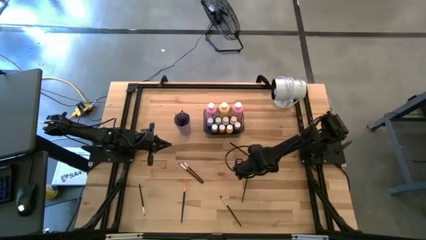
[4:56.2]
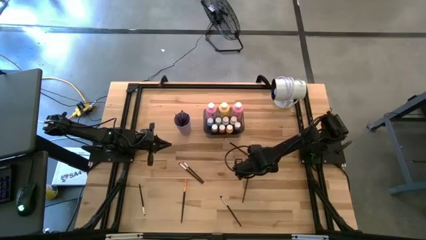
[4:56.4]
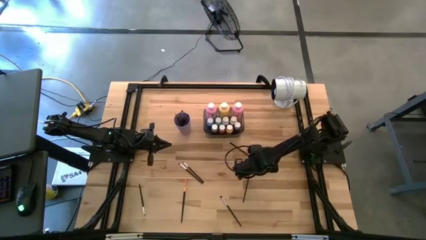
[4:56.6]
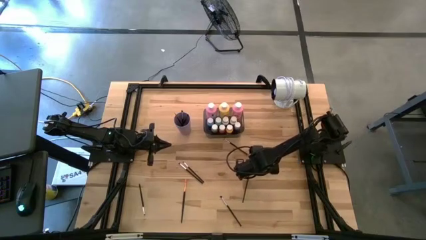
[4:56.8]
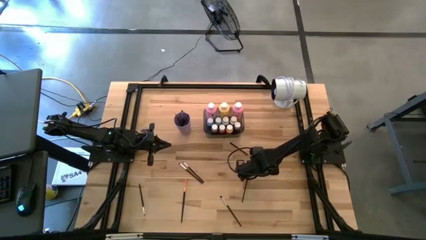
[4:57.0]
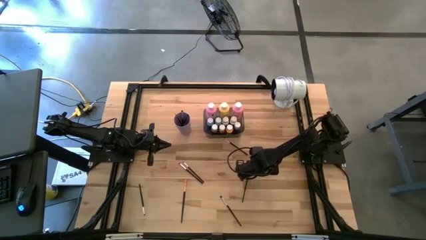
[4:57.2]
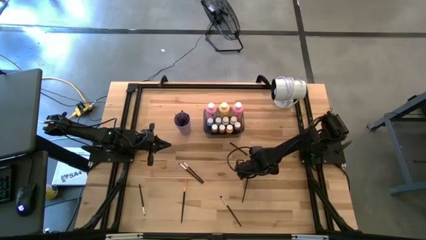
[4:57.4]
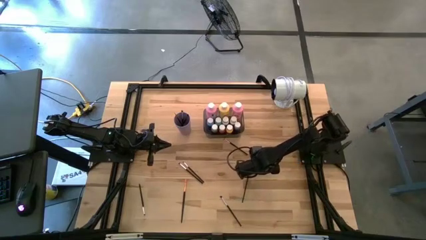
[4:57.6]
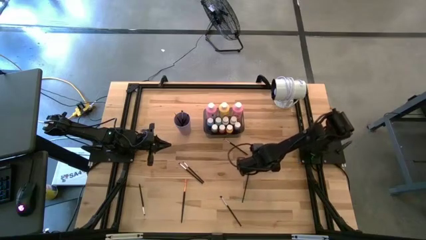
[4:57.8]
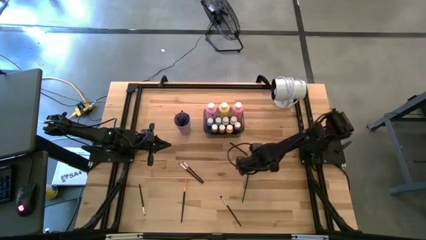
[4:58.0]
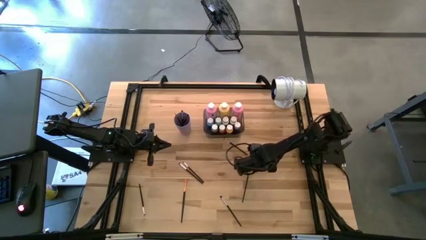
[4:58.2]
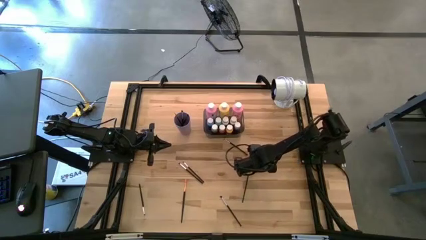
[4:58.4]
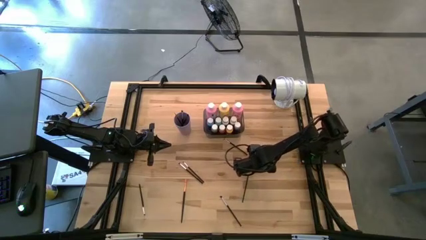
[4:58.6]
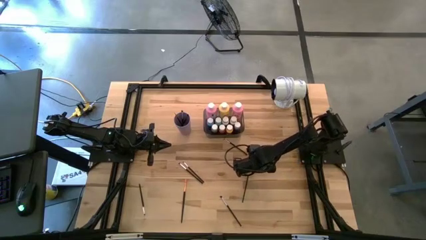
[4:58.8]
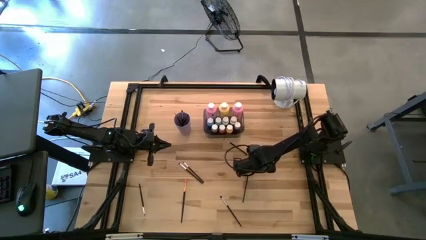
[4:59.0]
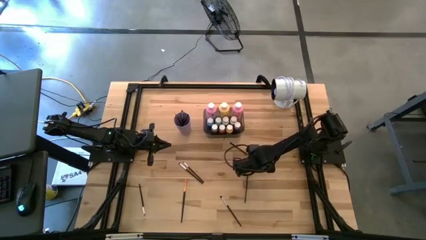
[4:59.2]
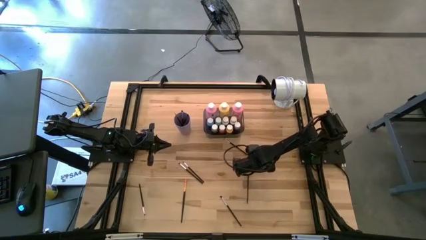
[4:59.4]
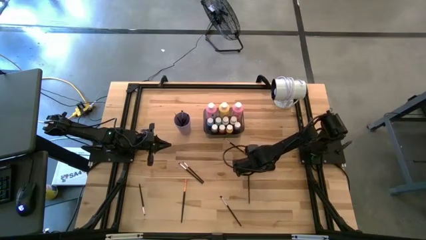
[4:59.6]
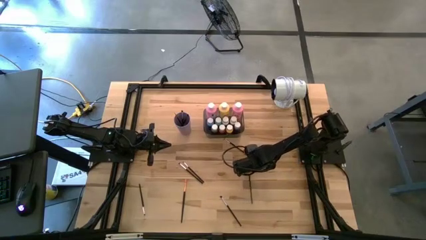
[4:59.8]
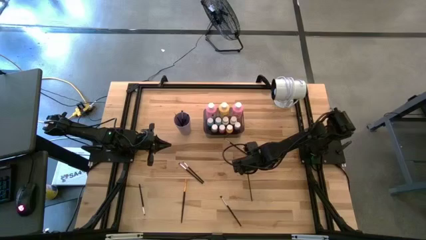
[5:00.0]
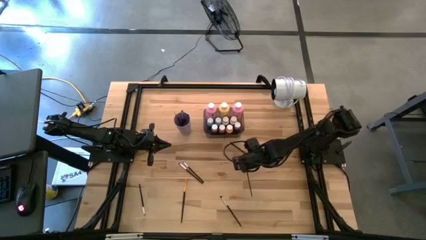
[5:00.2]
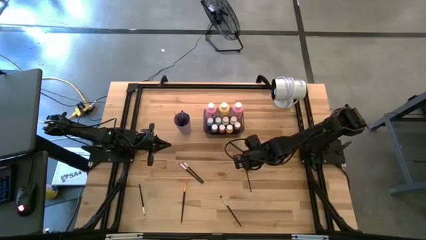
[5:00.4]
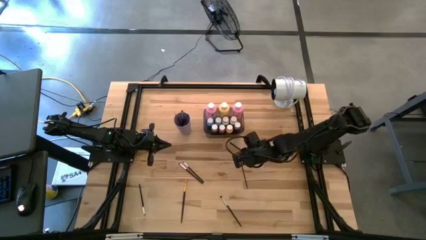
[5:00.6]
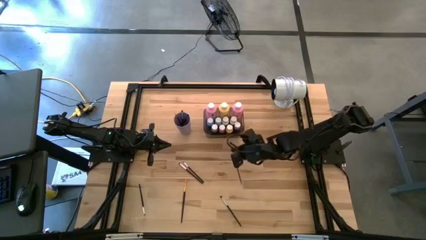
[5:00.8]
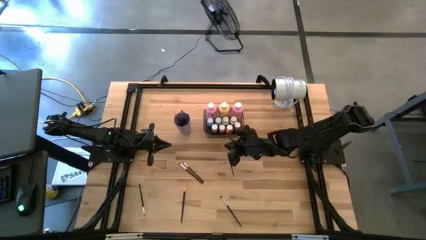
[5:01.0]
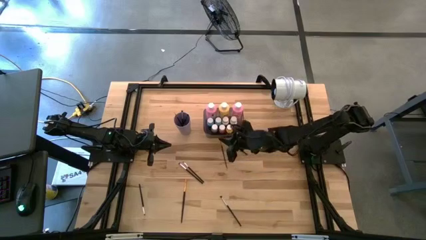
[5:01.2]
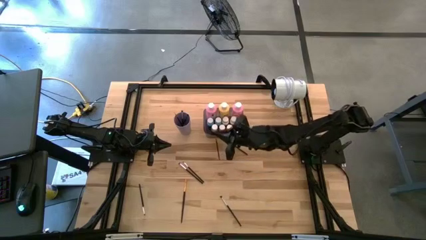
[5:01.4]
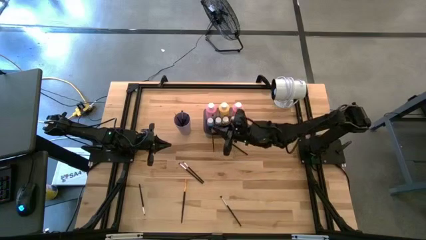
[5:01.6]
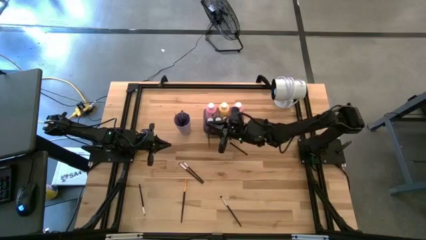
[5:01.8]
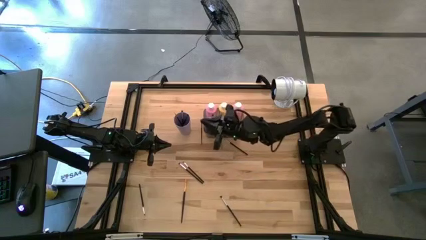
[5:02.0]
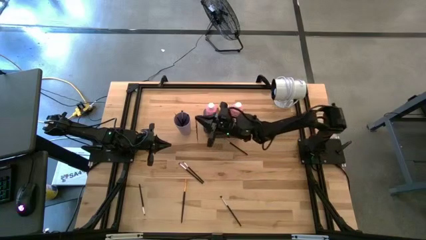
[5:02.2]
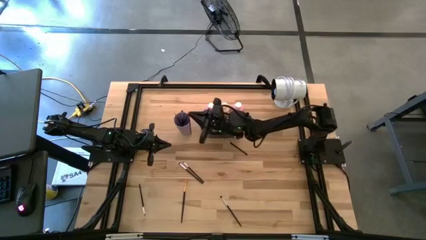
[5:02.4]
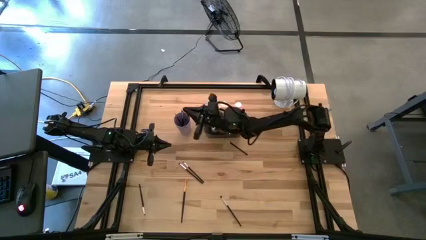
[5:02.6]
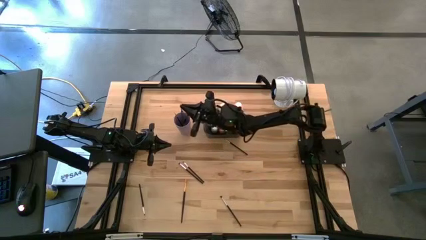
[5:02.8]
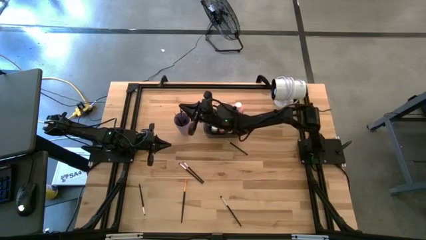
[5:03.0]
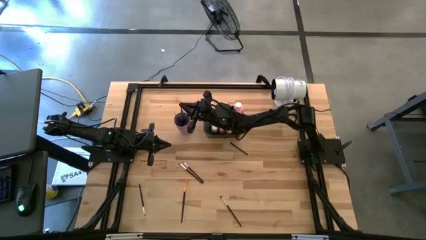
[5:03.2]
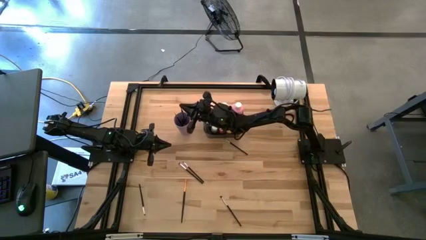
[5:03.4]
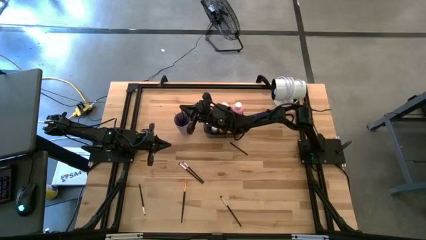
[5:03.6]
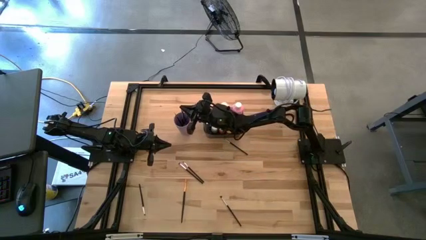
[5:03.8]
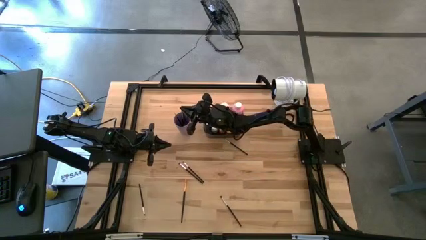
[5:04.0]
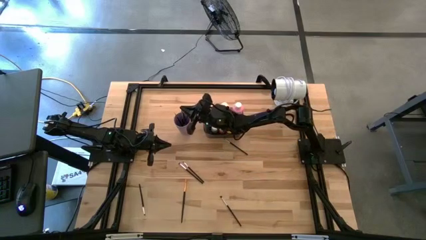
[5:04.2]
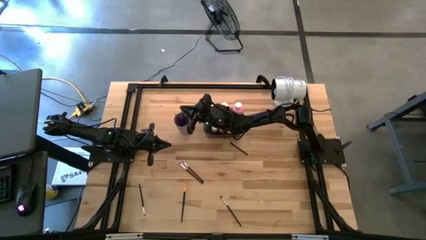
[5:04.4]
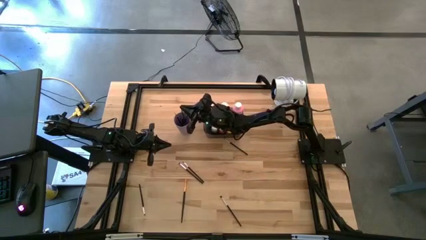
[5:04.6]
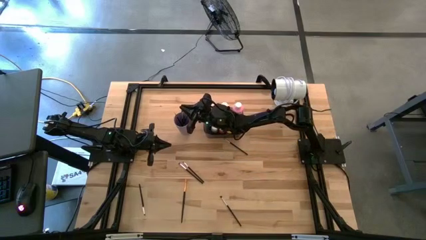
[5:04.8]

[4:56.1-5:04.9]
Task: Pick & Place Paint Supplies
Put the gold paint brush into the purple cup

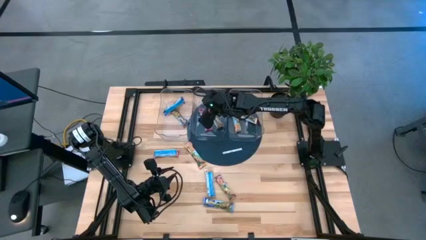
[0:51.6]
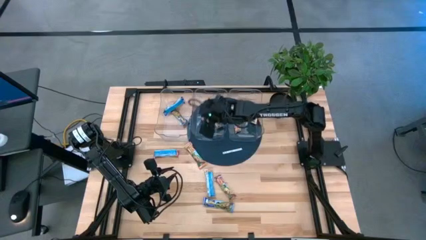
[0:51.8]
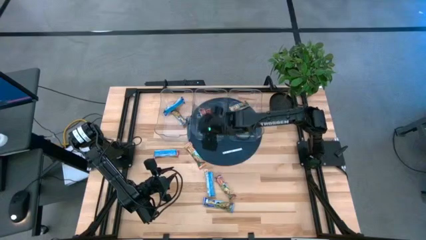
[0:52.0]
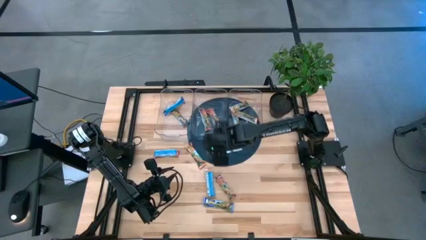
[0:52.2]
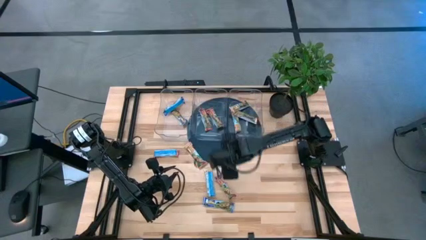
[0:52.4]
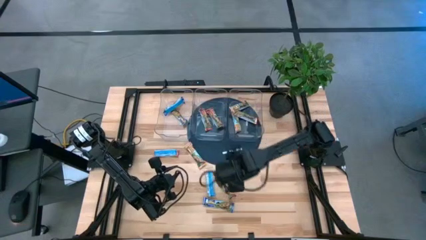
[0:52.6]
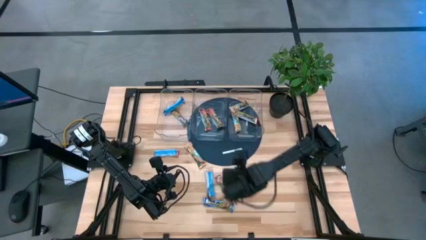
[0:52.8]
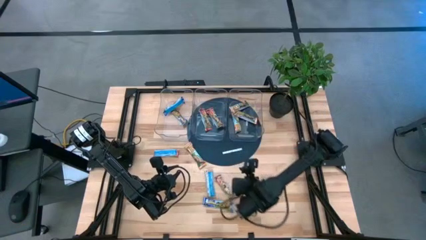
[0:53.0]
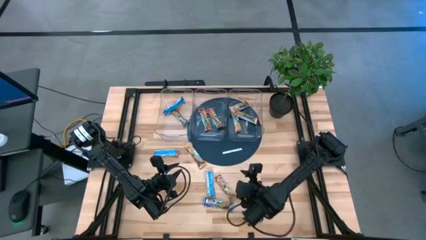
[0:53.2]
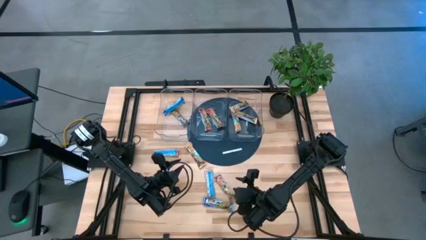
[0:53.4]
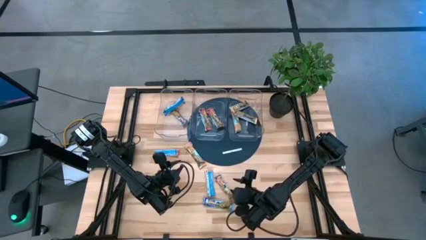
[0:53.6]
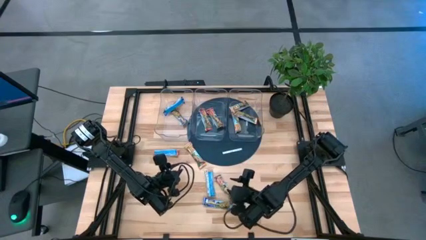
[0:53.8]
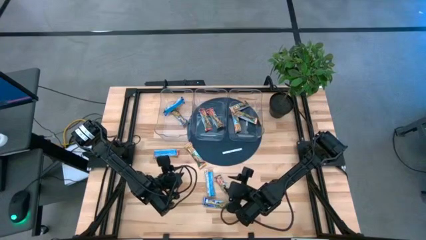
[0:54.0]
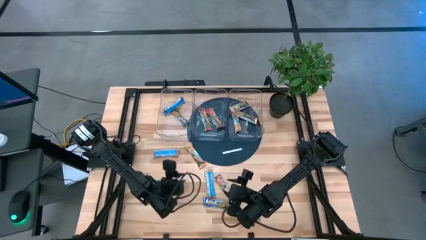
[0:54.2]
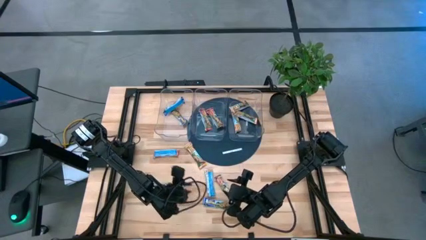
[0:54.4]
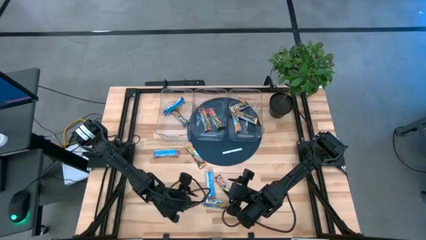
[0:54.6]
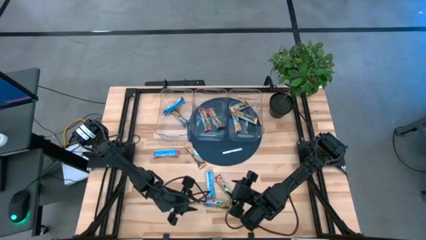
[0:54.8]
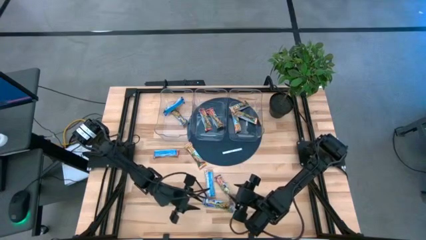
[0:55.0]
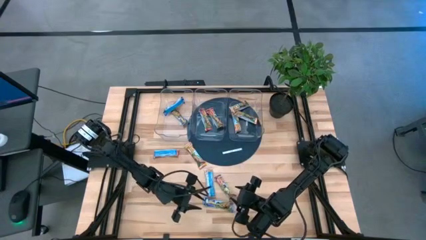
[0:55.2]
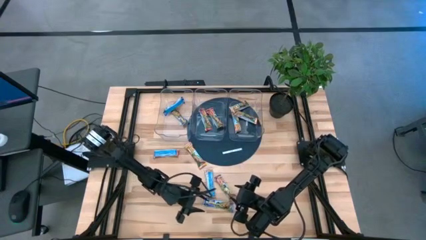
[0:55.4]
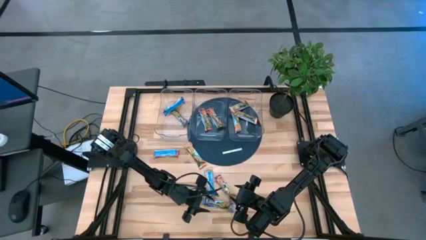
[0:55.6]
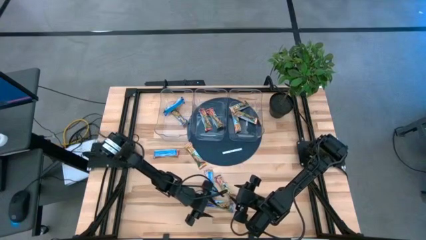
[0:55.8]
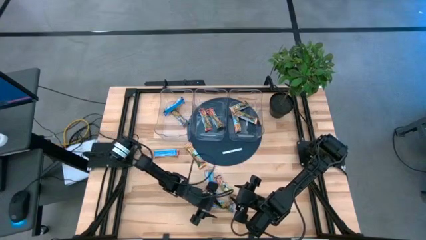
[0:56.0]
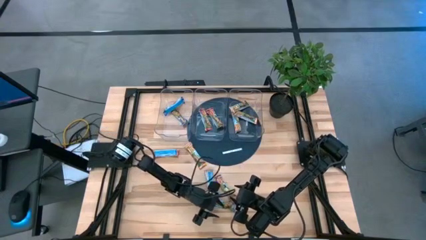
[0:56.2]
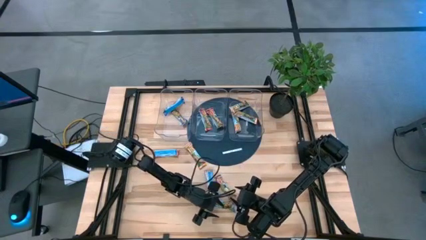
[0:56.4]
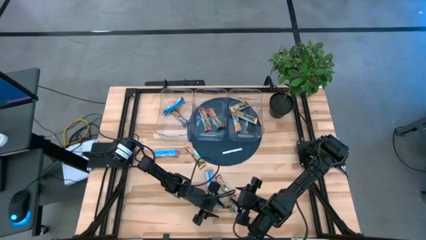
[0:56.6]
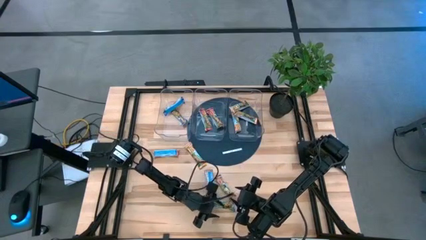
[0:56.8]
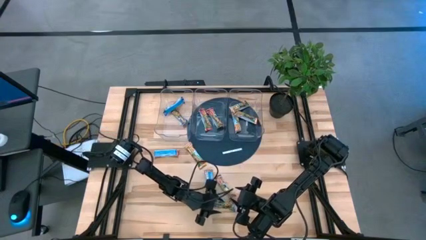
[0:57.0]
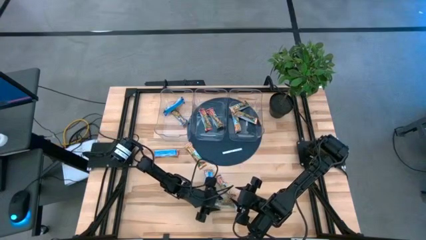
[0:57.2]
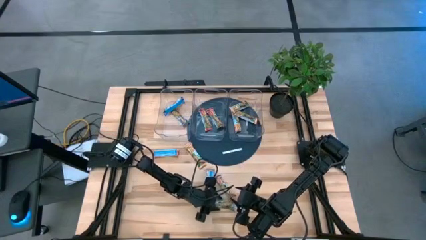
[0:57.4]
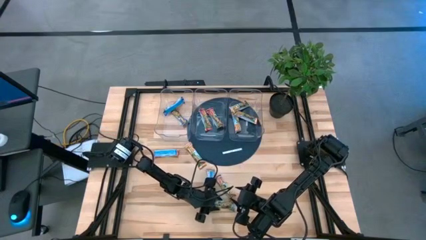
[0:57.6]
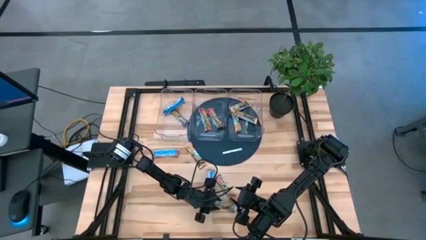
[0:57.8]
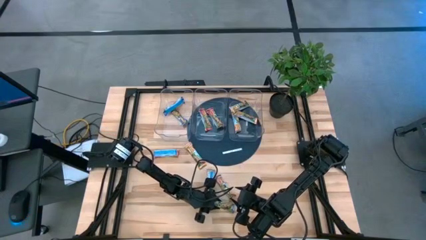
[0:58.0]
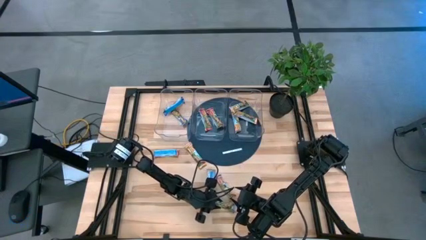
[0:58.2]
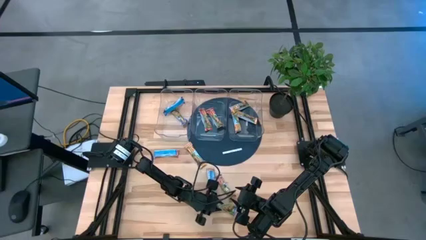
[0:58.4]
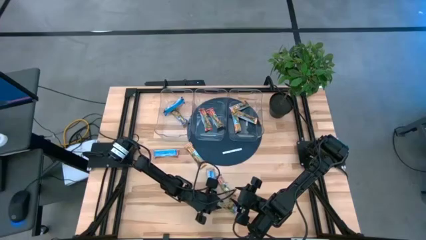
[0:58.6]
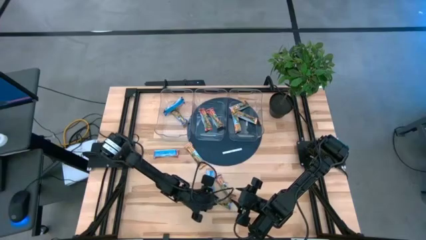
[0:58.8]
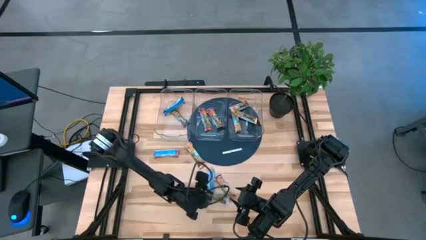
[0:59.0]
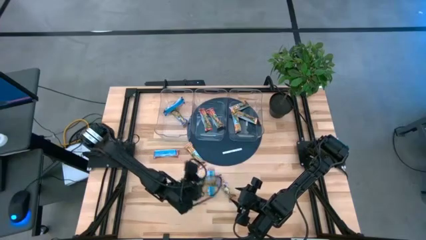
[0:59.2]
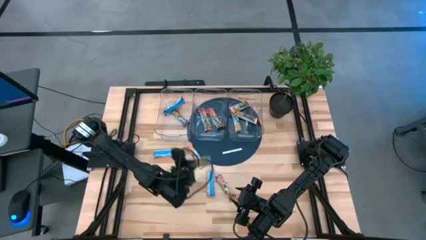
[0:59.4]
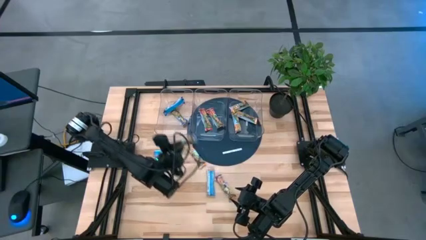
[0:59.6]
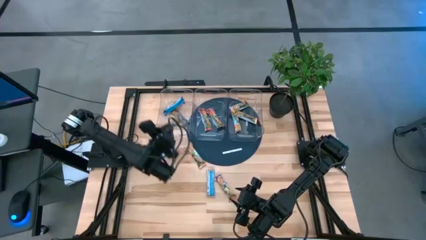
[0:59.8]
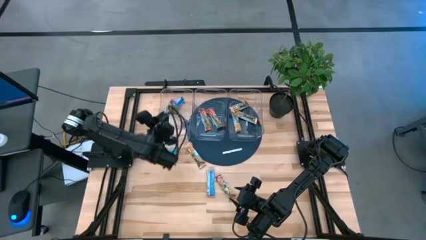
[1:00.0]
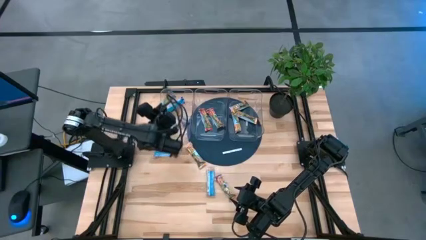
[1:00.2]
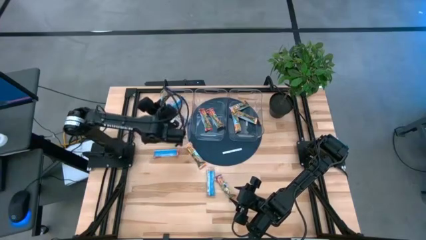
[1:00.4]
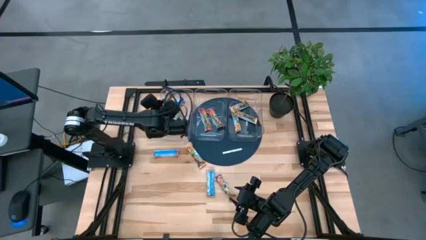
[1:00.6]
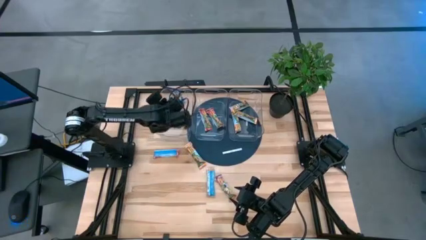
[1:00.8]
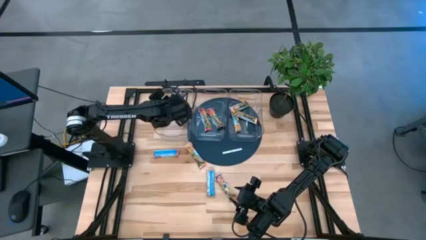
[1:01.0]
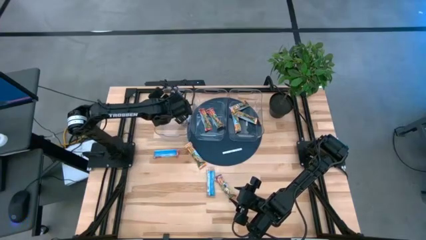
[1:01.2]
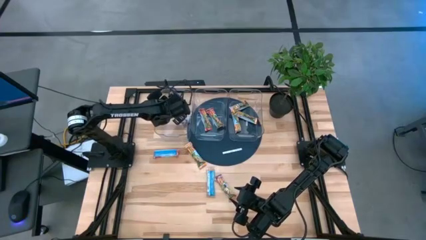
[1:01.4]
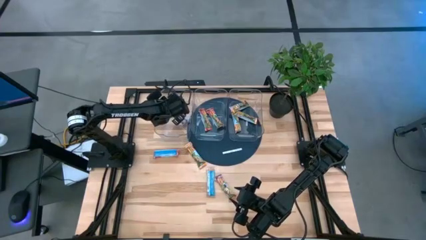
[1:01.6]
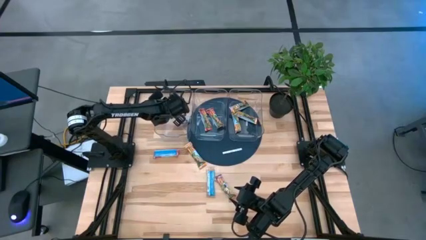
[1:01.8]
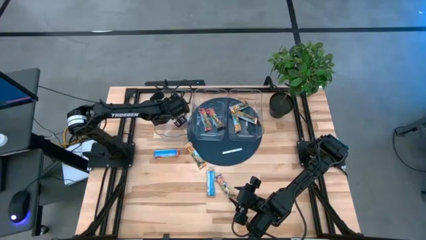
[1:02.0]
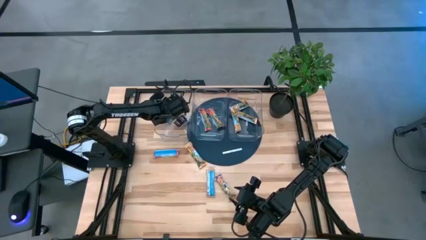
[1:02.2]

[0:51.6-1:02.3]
Task: Pick and place Granola Bars by type
Put the blue granola bar into the left transparent bin
